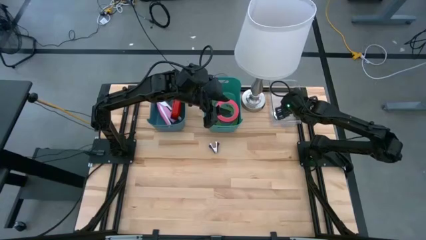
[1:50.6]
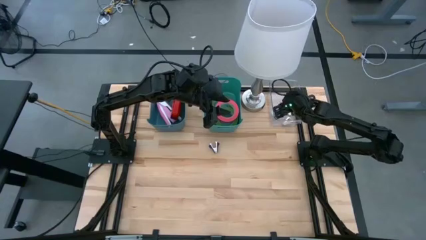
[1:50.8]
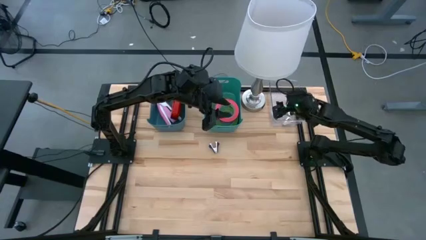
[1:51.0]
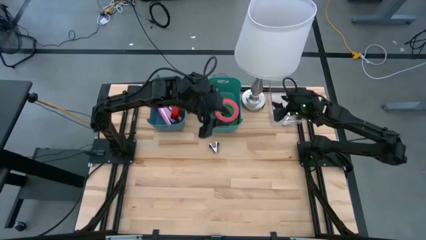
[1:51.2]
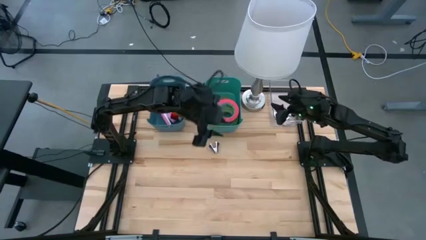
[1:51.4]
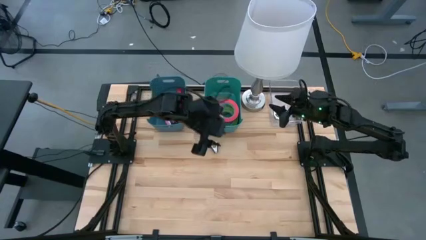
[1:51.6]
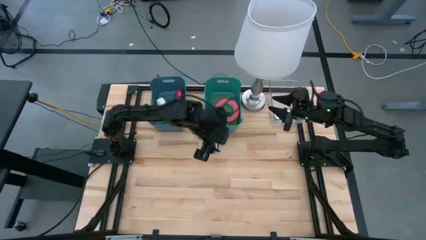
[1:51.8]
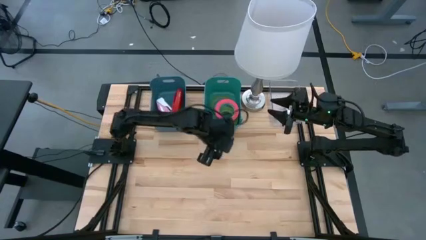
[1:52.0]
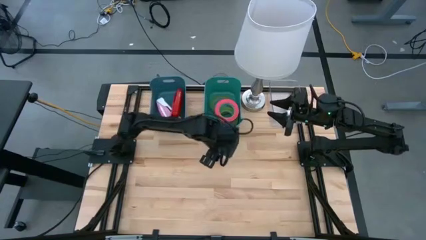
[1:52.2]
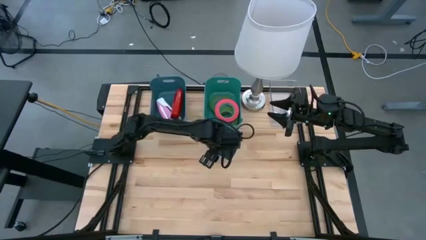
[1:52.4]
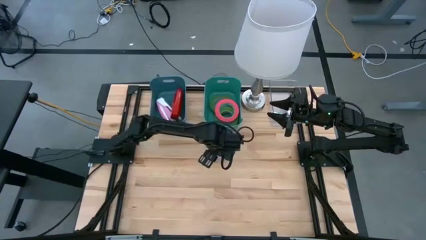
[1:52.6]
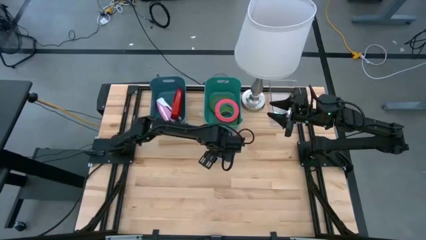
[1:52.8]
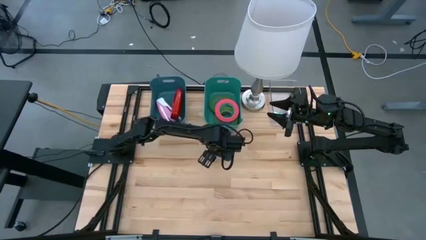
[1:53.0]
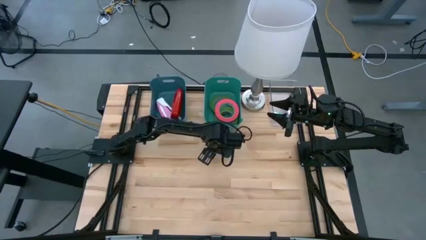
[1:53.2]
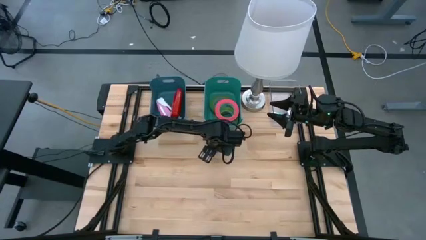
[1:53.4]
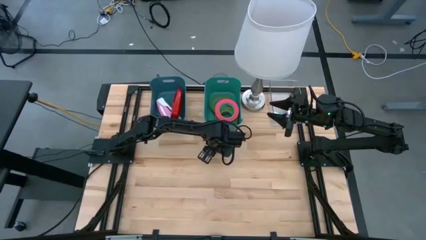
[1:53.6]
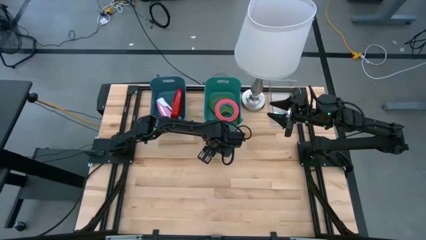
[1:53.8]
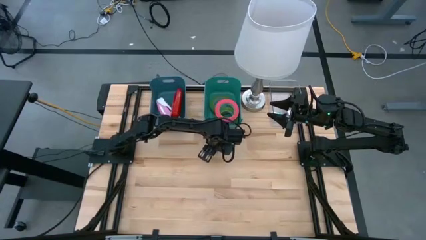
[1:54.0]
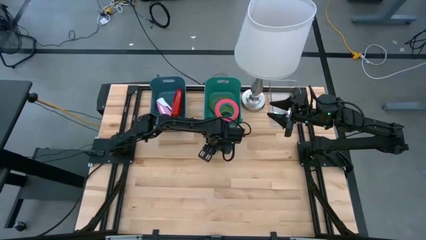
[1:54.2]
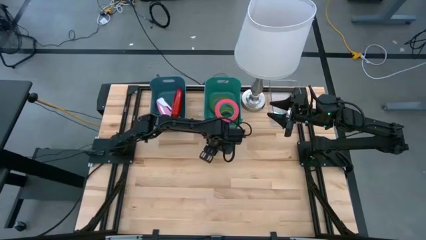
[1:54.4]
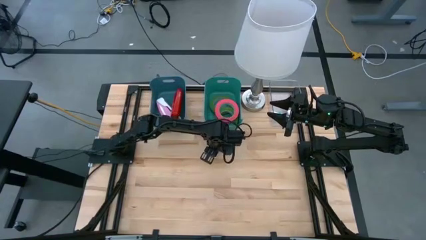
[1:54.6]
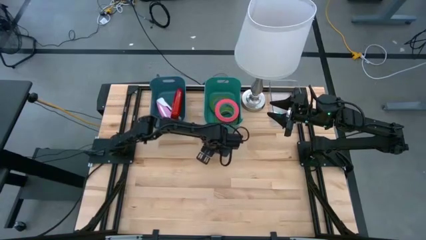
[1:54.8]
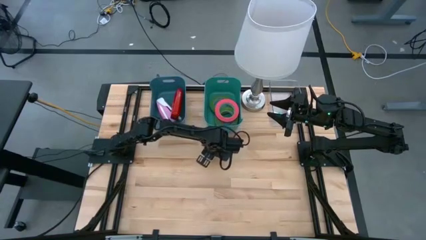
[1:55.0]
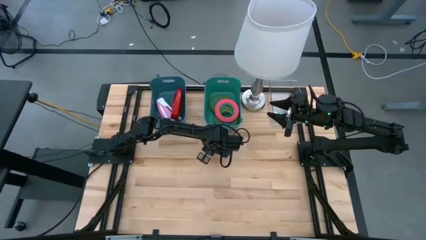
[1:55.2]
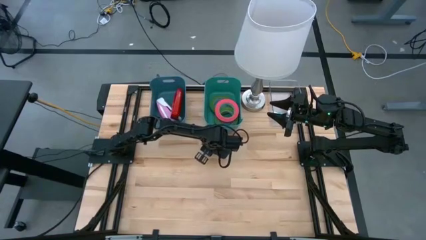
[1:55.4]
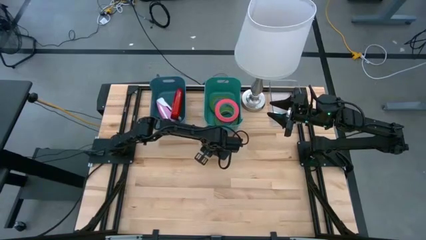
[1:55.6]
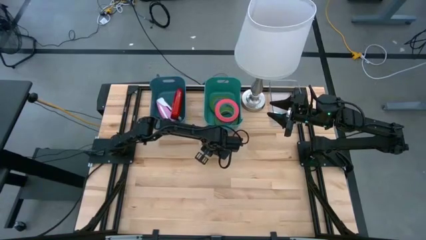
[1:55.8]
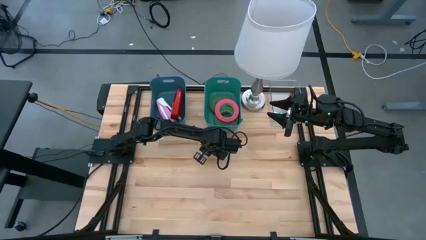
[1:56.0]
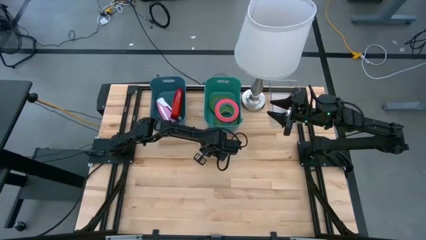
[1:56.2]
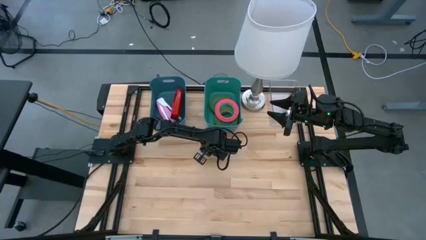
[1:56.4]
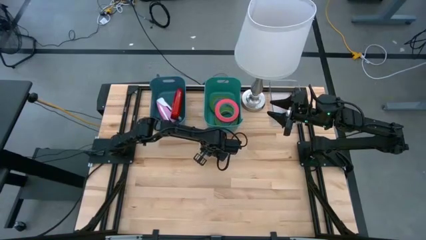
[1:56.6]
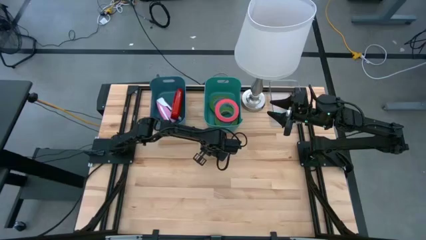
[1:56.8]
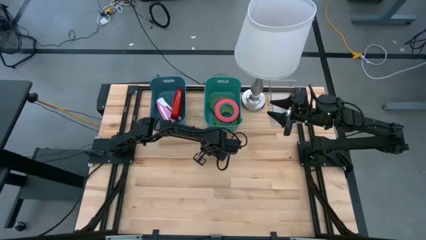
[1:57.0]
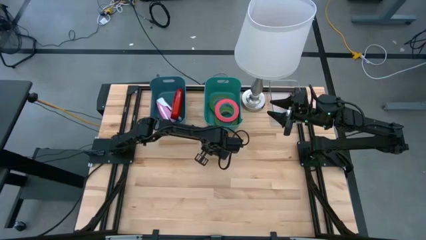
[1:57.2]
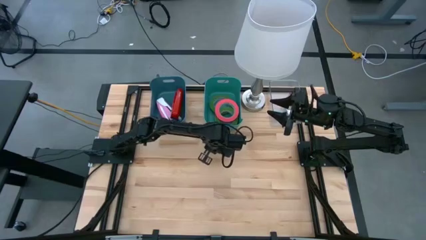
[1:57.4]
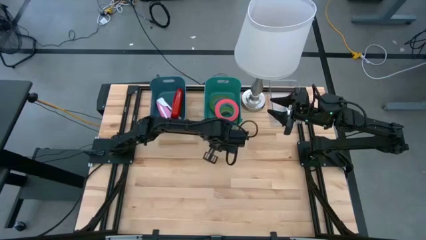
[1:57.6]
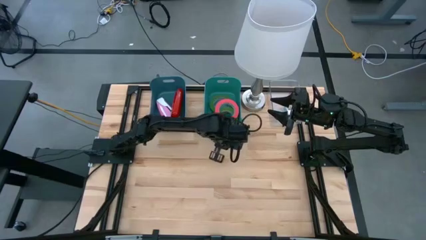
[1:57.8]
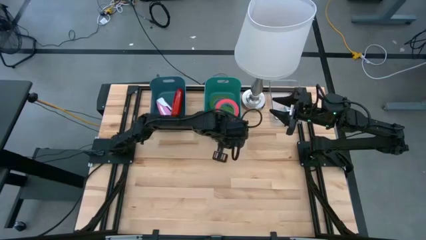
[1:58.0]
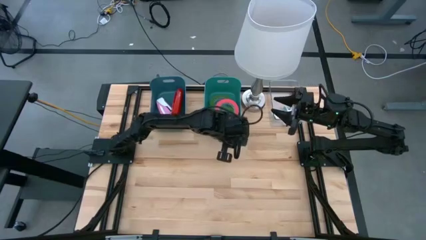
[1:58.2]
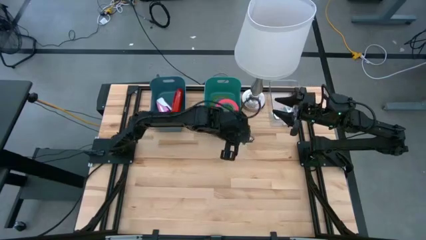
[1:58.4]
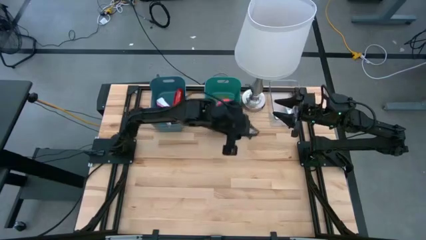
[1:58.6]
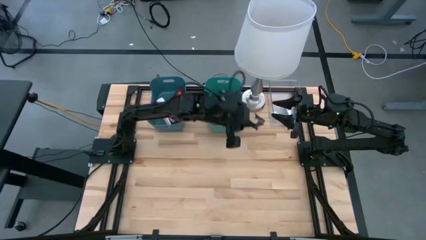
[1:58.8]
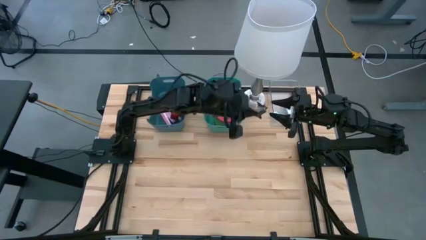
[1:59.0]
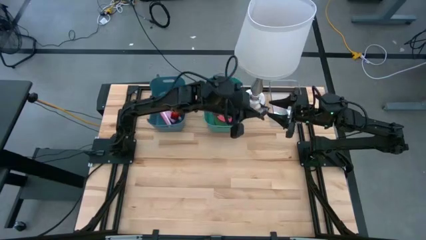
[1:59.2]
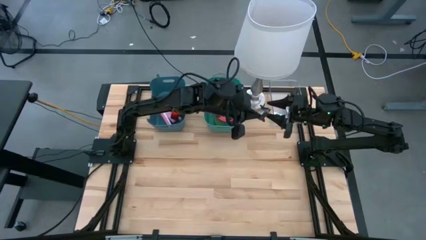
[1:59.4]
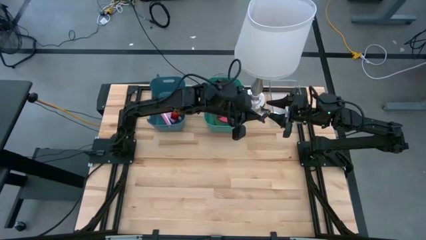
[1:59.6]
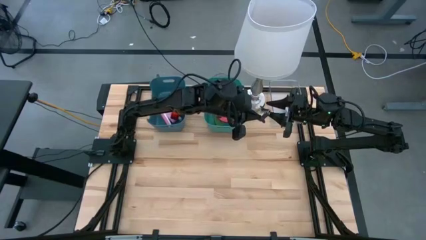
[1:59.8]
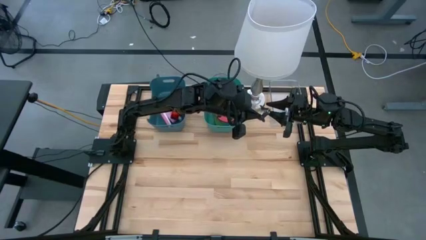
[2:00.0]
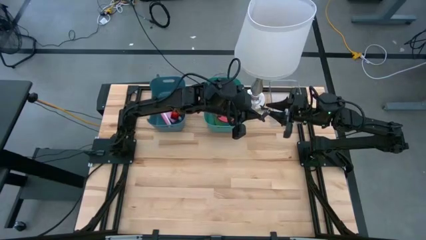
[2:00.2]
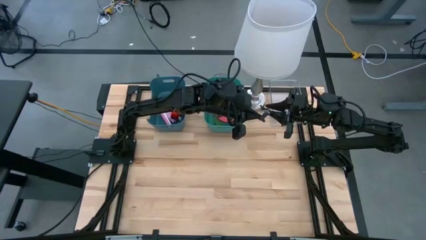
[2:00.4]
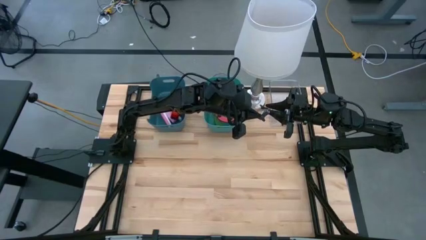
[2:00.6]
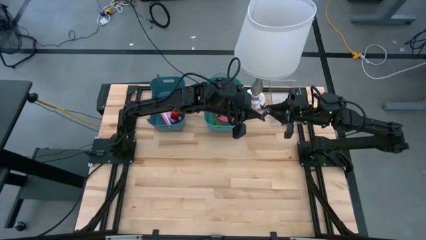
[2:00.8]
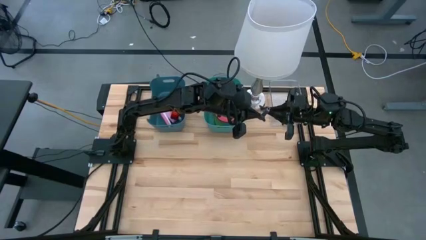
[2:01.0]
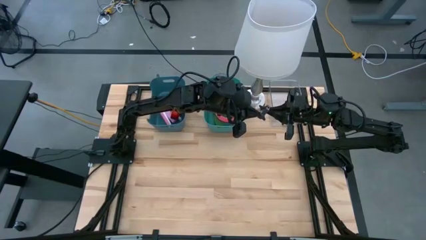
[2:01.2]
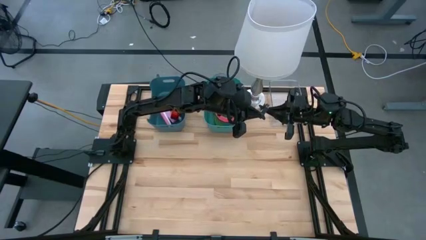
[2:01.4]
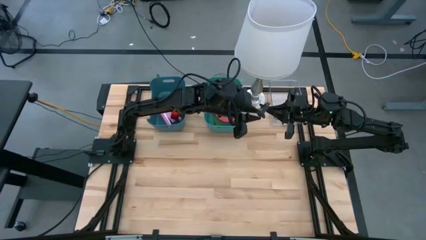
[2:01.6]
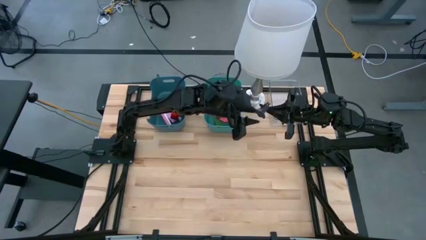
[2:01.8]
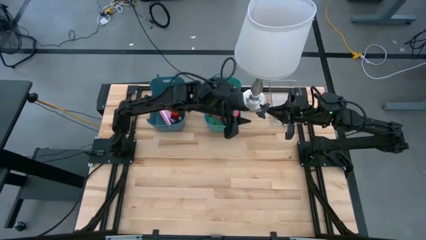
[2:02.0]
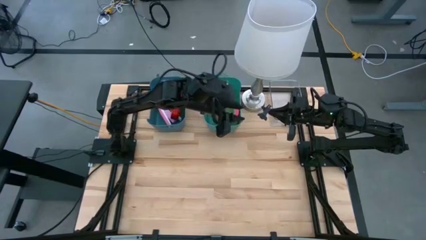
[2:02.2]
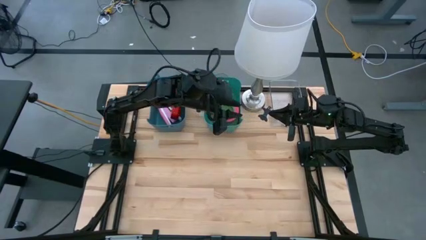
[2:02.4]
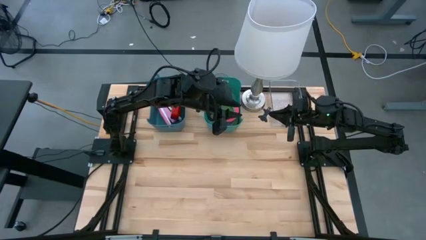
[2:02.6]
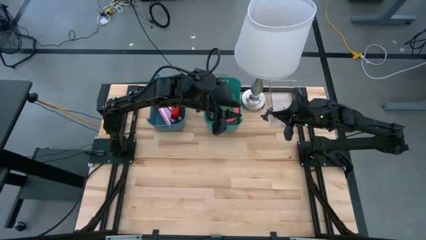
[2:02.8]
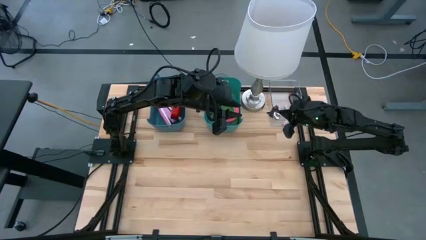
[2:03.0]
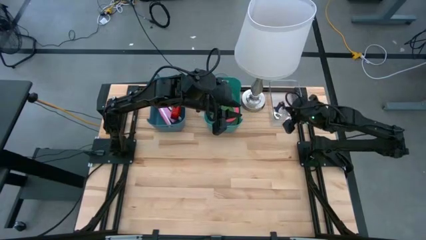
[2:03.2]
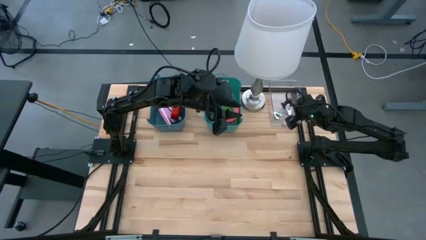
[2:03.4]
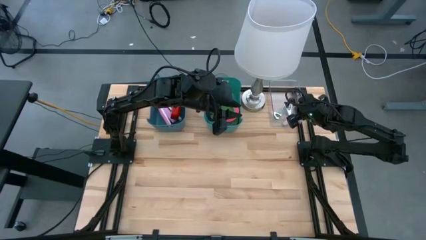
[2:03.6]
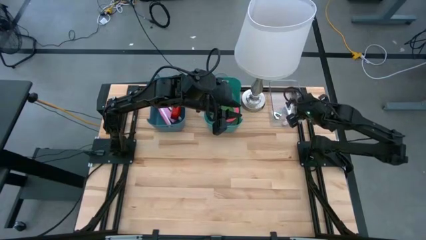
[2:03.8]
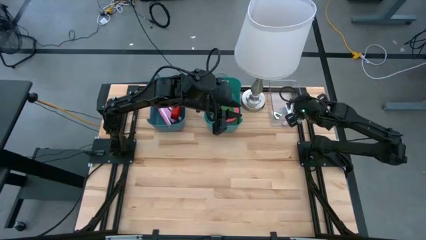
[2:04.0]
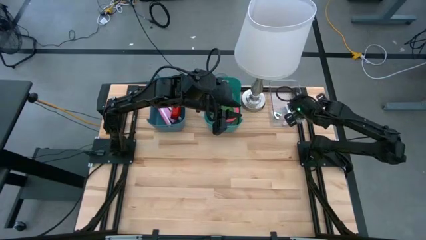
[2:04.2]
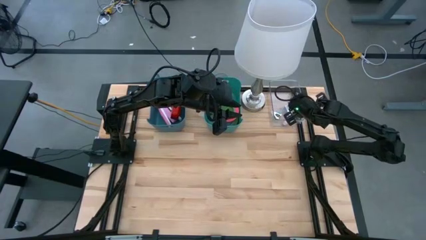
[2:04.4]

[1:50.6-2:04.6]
Task: Pick and place Stapler, Stapler remover, tape
Put the black staple remover into the transparent bin
